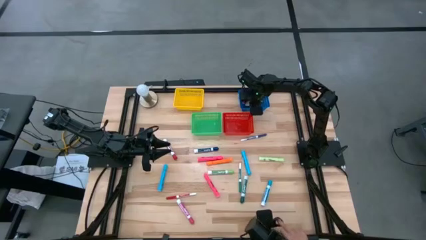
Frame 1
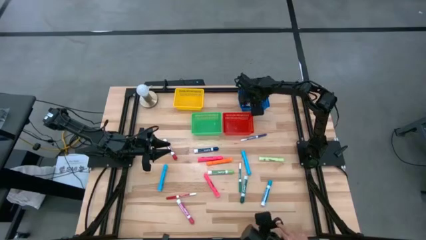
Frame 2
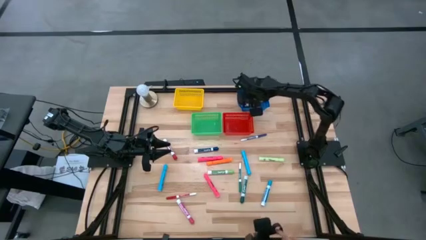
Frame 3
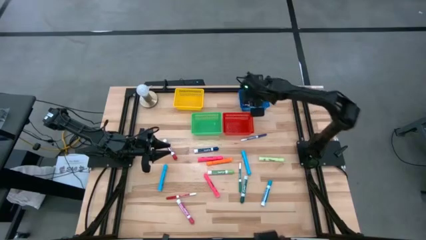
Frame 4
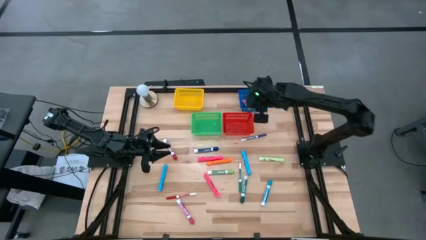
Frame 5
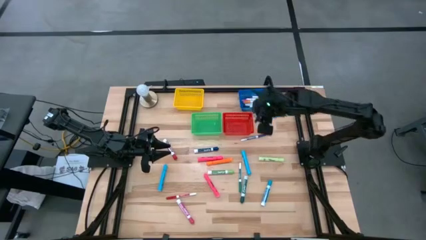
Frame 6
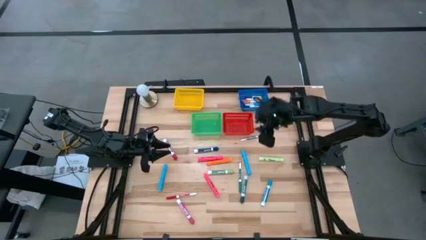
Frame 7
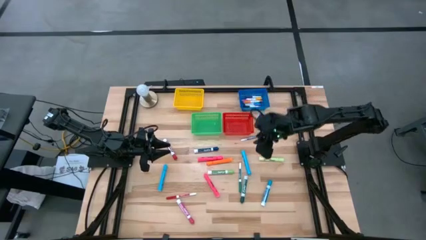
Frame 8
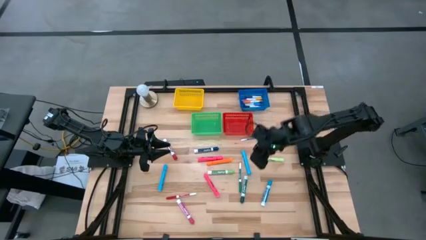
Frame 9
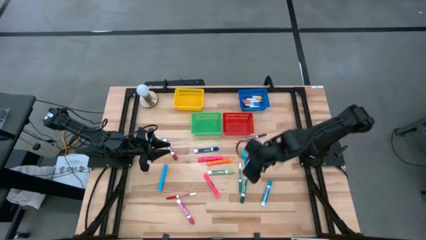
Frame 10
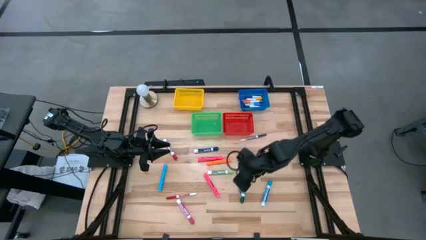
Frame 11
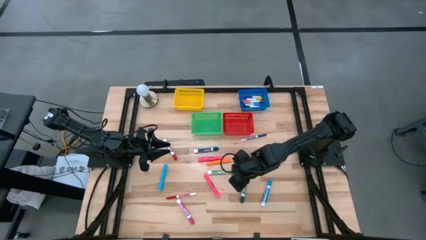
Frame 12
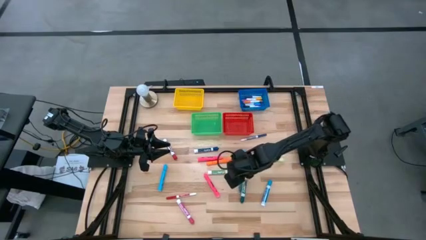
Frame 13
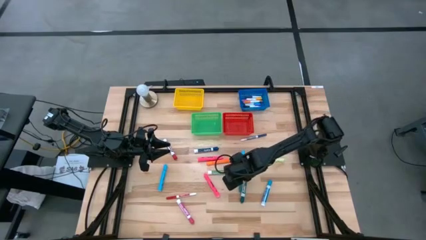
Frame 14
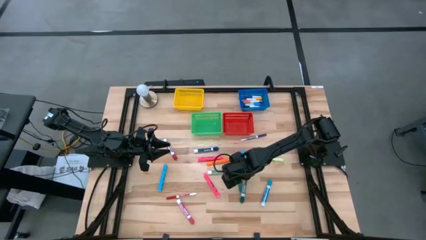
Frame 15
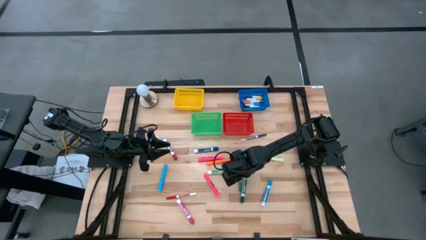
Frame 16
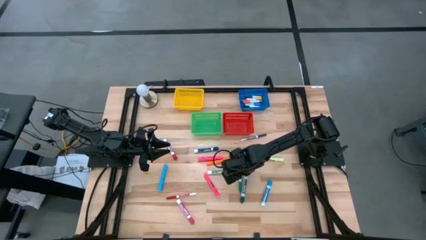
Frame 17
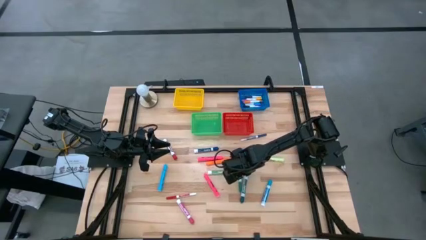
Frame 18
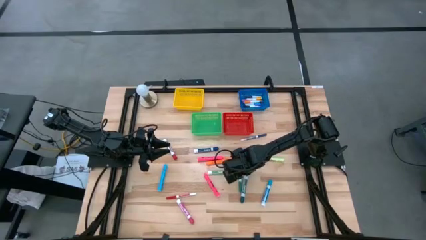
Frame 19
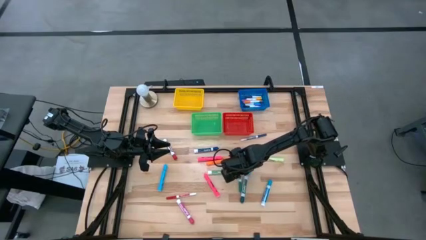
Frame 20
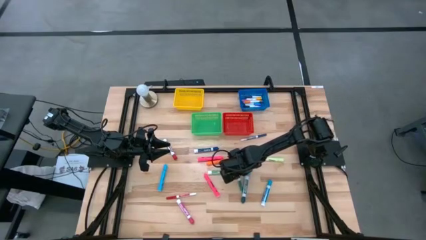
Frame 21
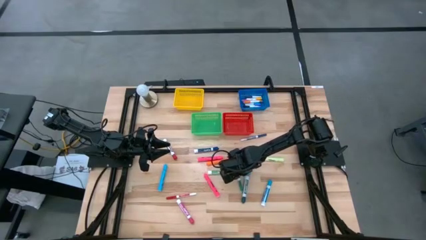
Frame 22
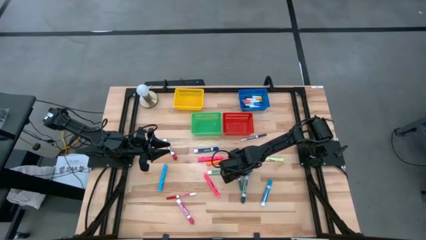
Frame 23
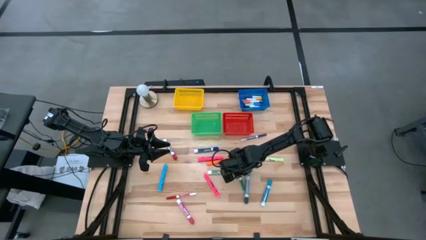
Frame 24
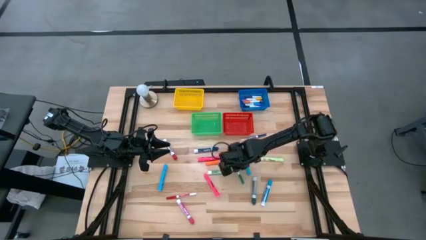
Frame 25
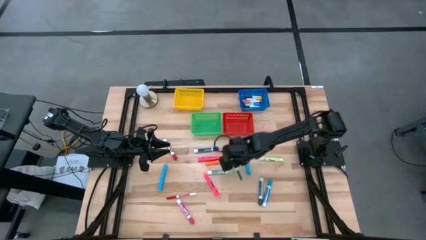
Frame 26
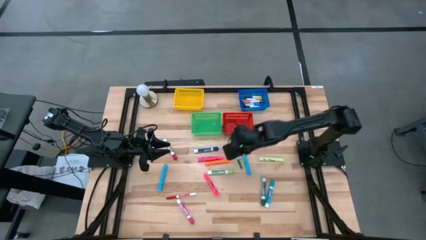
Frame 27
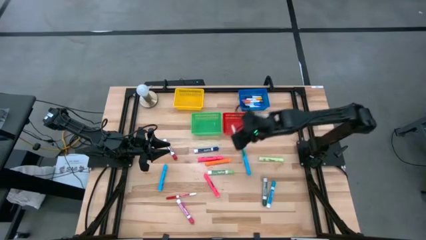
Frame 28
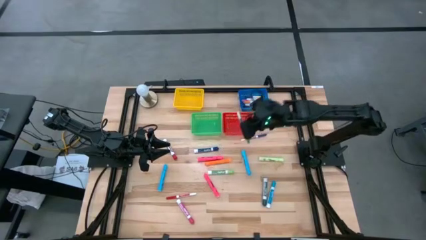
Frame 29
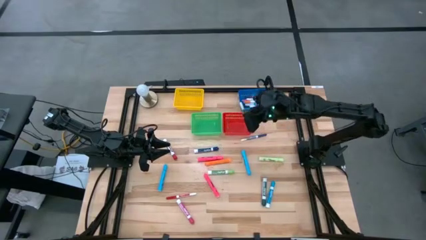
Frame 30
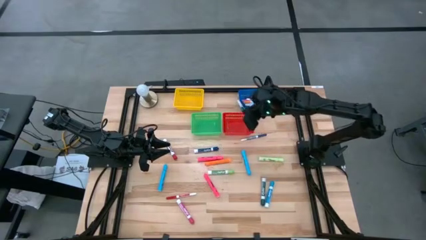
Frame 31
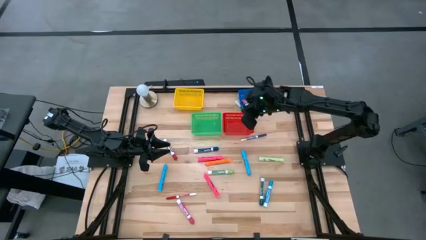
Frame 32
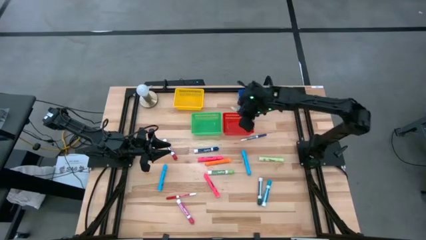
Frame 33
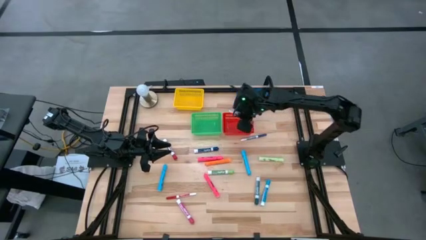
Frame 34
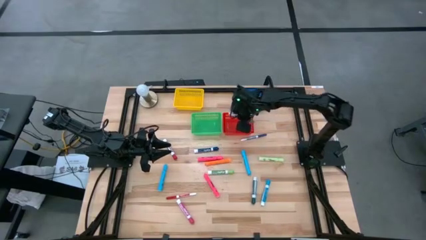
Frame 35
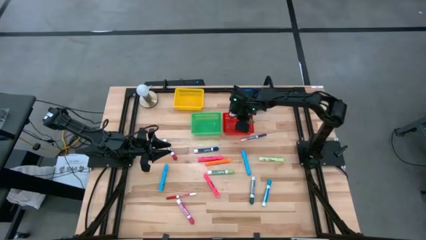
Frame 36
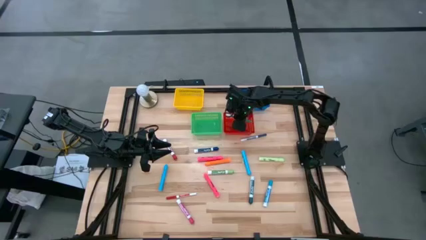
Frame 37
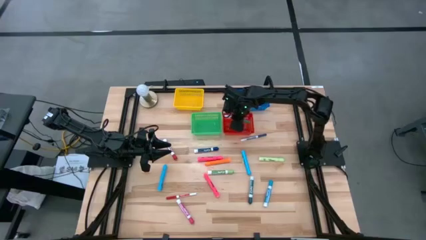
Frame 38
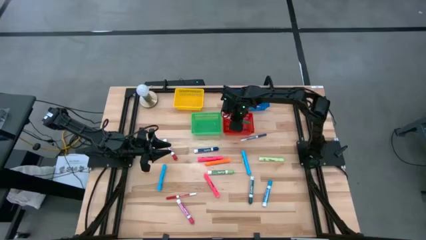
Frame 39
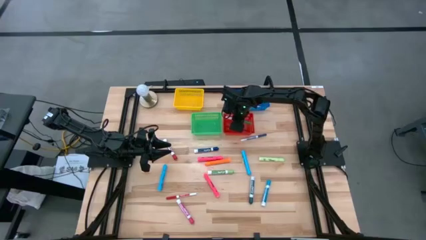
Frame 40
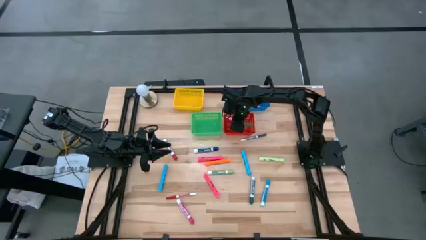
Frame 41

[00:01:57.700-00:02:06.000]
Task: Pick & Place Markers
Put the green marker into the red bin

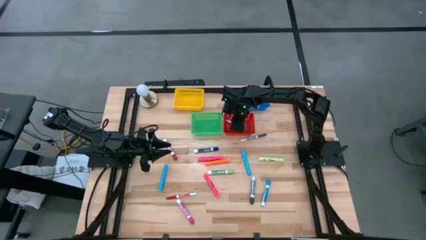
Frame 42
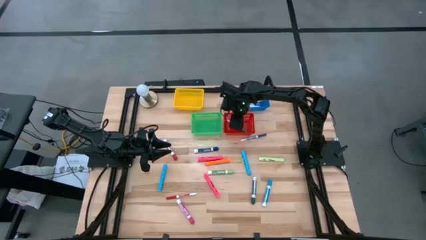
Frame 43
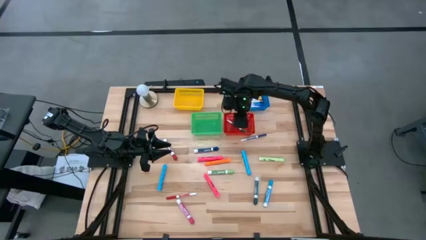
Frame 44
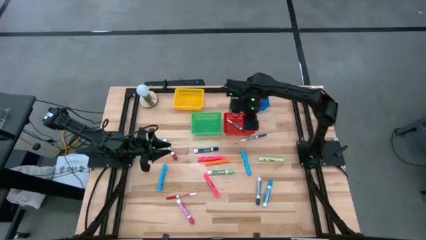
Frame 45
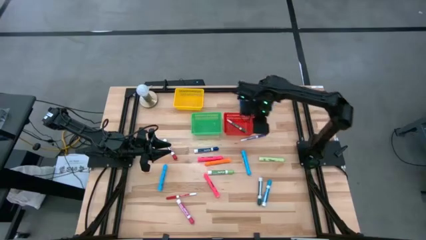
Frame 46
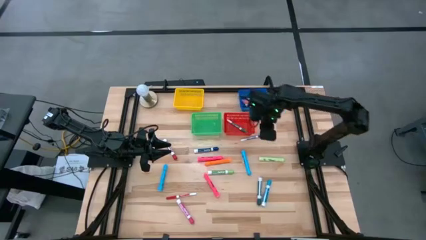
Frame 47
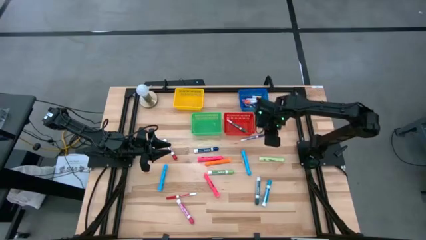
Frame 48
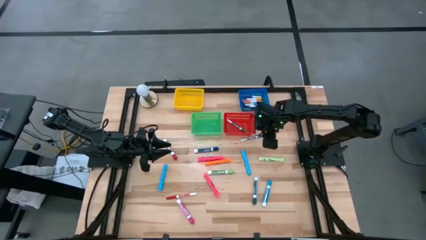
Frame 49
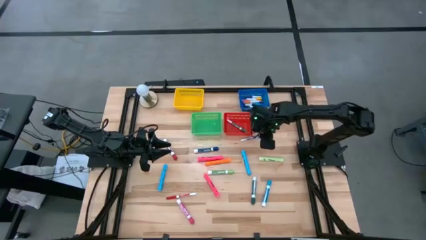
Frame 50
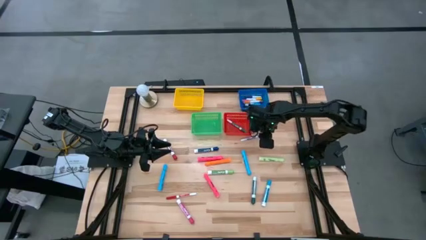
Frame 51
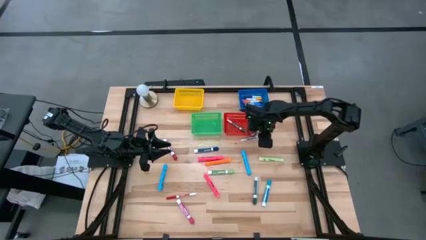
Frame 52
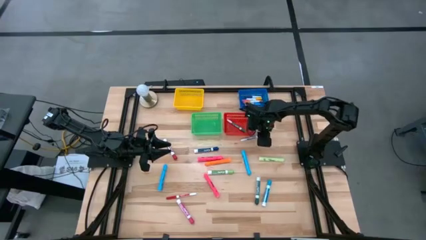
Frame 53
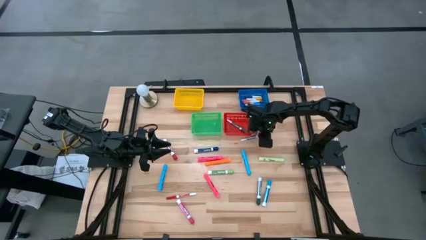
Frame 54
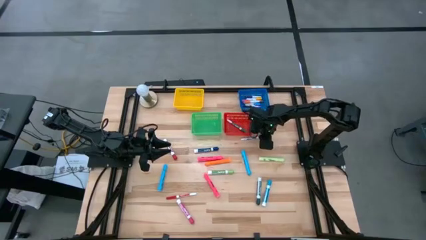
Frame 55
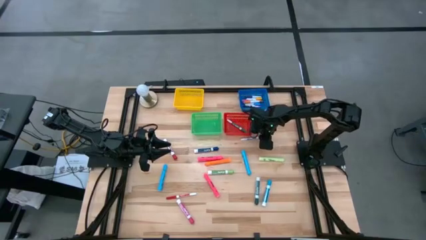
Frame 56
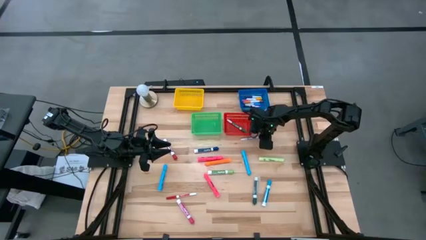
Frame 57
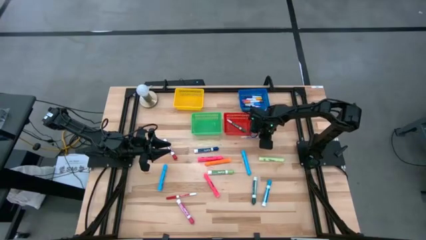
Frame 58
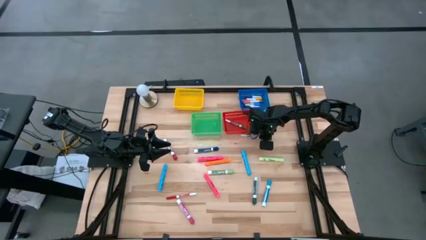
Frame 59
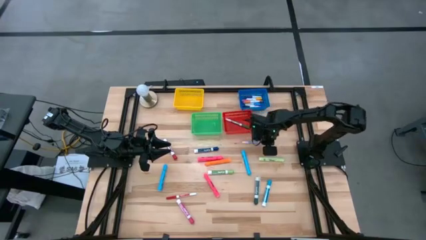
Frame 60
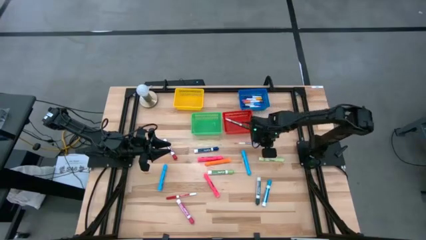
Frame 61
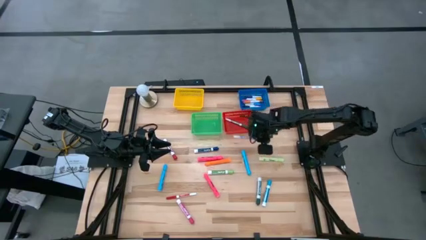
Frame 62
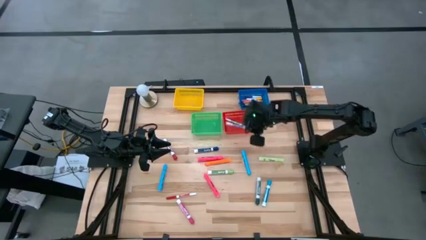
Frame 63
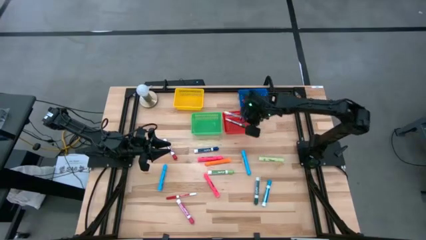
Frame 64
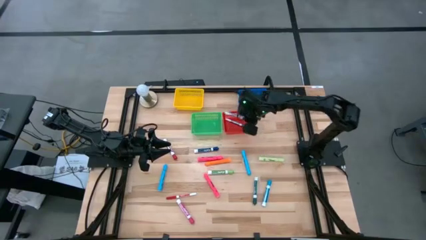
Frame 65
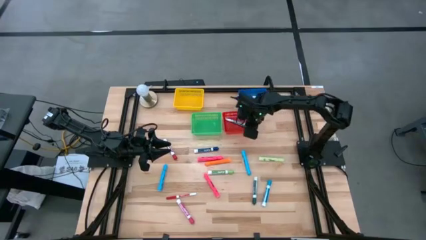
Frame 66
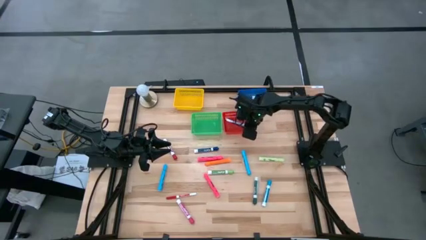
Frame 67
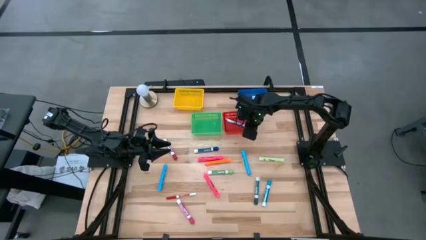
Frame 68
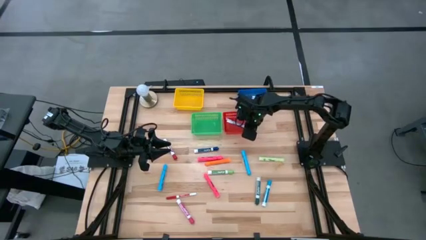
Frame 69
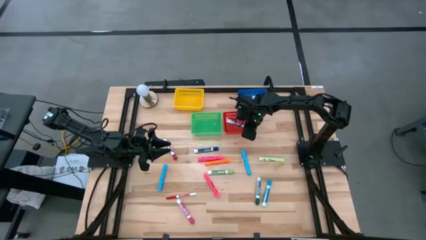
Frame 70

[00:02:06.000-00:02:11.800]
Put the blue marker into the red bin

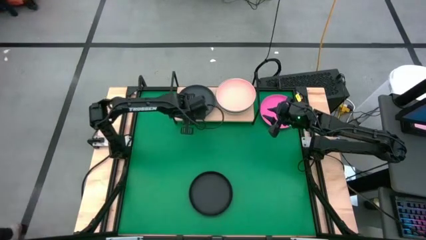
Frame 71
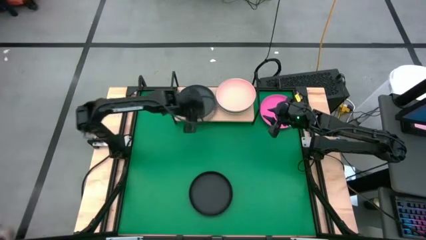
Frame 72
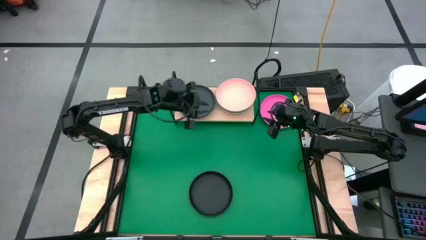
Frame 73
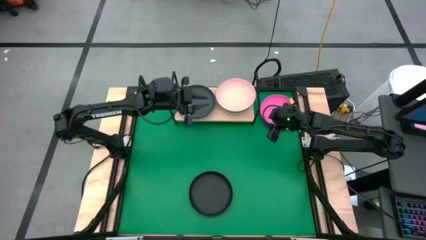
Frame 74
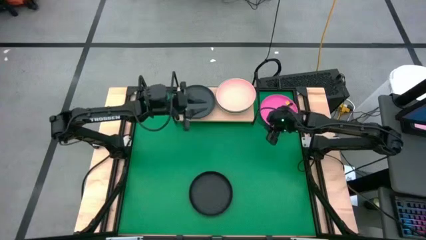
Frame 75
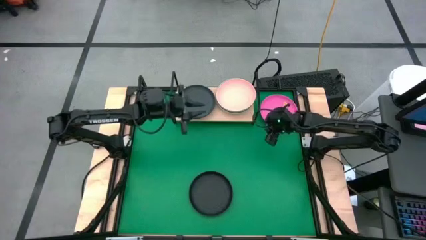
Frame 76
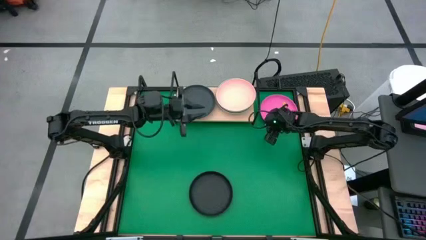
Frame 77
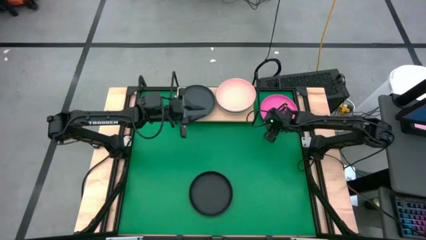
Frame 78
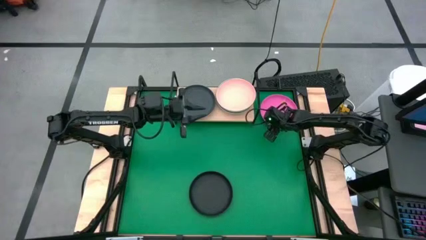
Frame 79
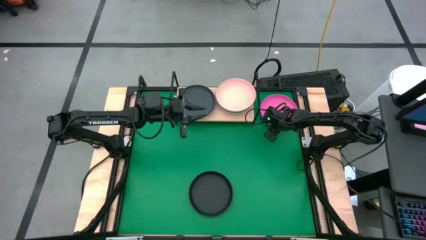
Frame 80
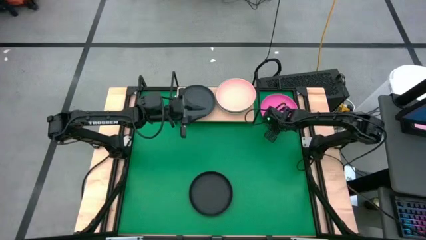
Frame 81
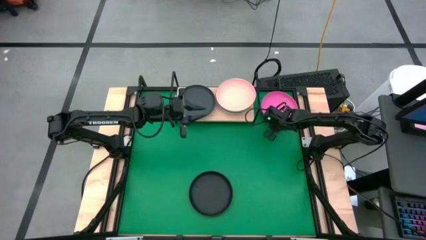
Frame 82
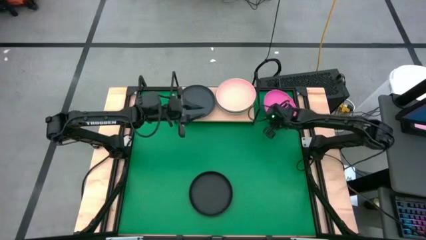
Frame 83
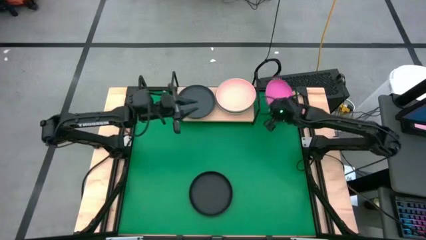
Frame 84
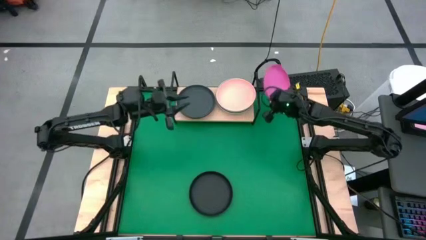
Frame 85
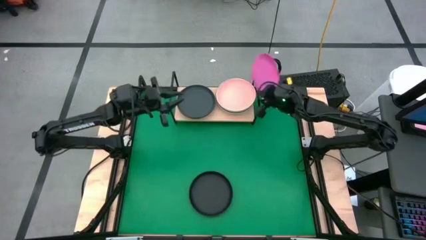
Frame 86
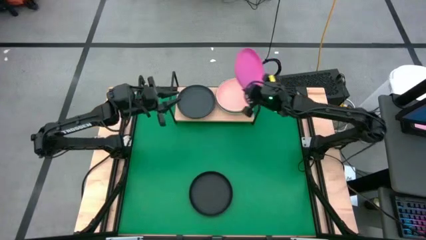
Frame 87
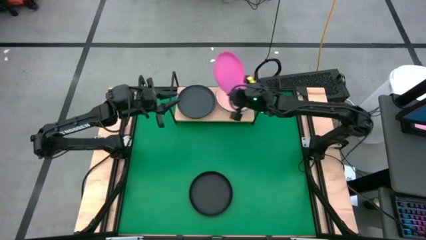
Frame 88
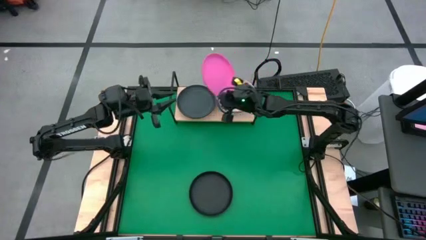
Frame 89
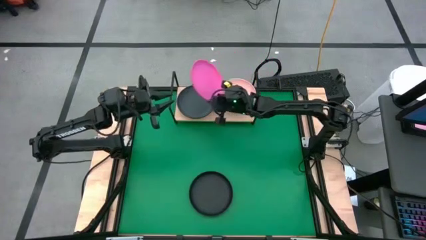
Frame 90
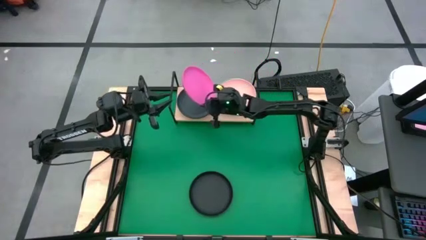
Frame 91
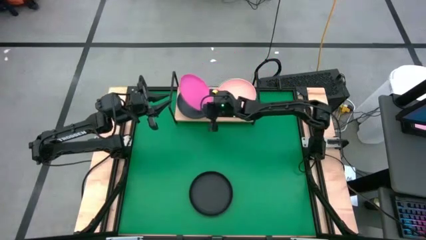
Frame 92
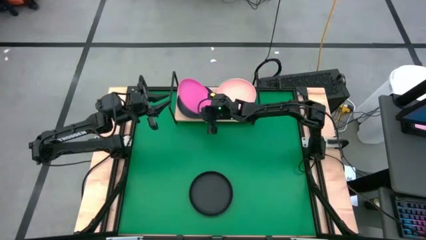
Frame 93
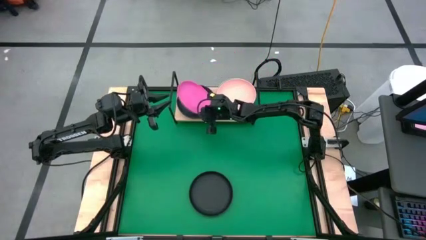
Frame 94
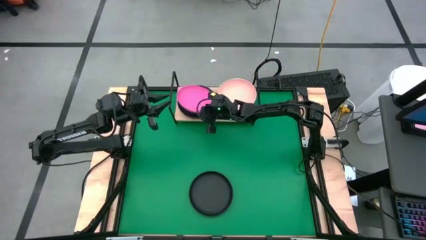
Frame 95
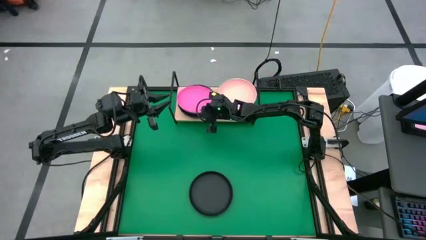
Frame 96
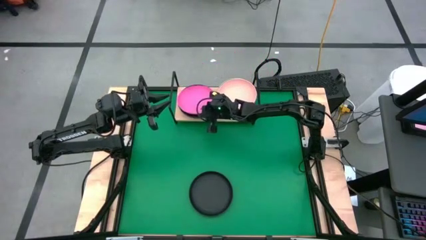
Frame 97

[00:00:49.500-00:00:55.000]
Task: Place and stack plates onto a shelf
Stack the pink plate on top of the black plate
